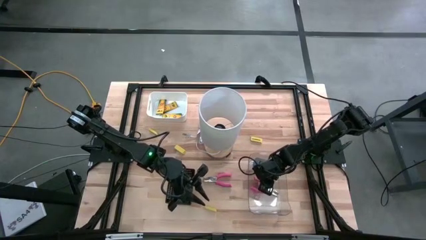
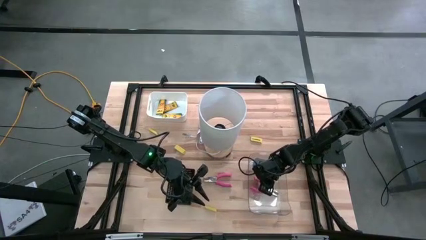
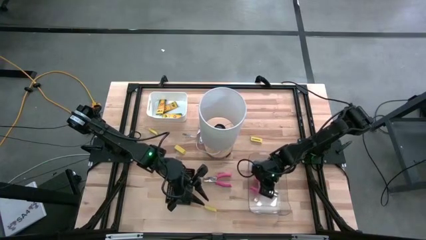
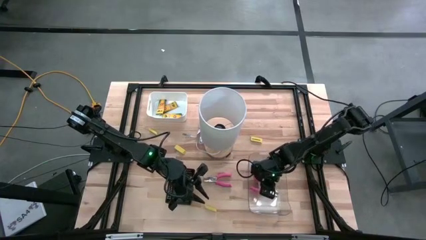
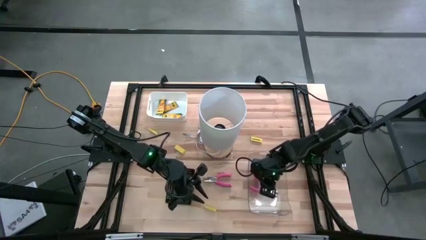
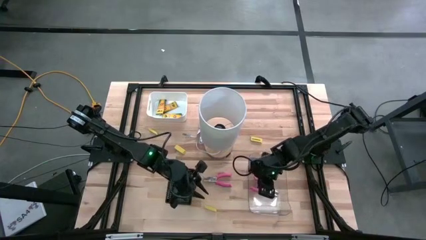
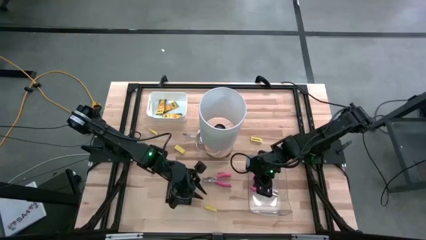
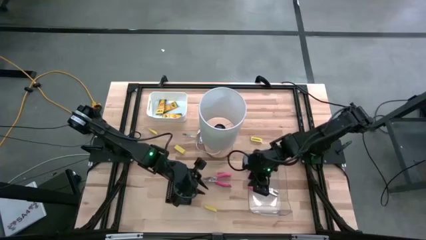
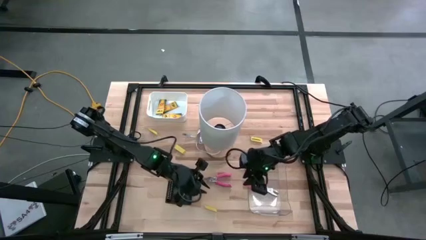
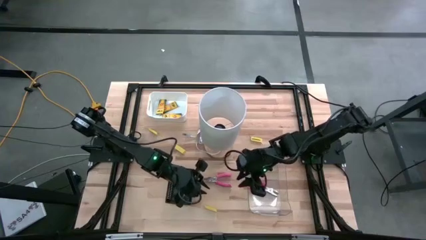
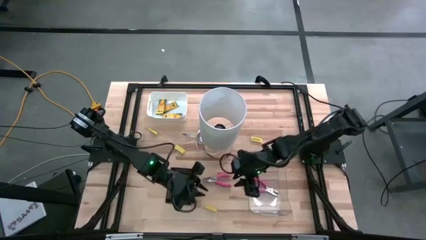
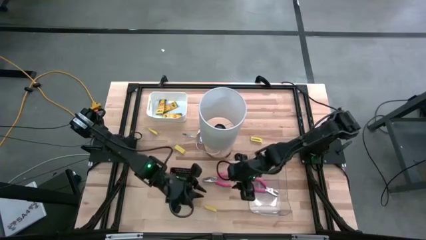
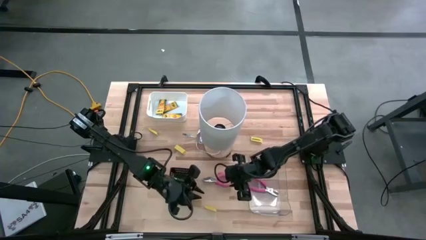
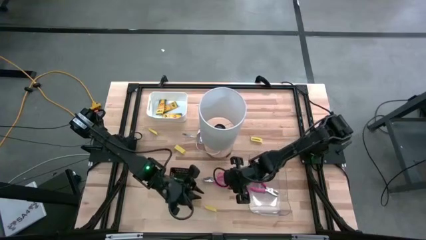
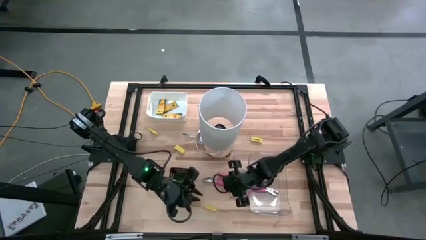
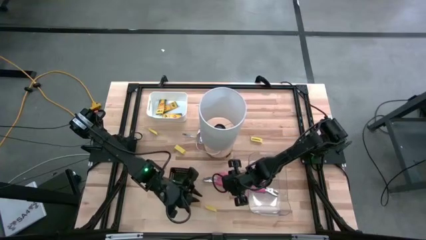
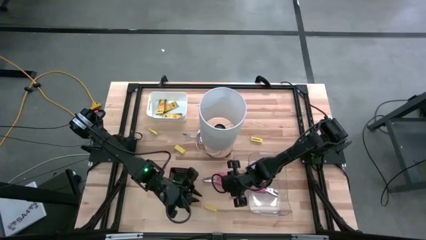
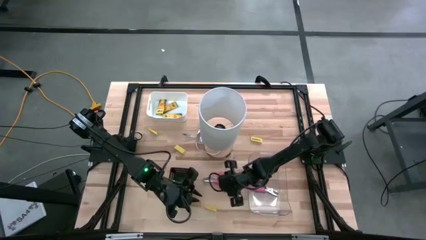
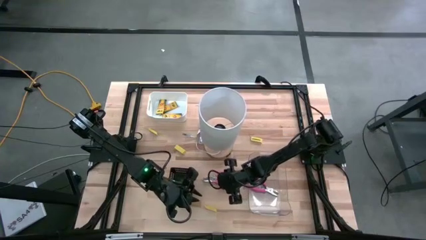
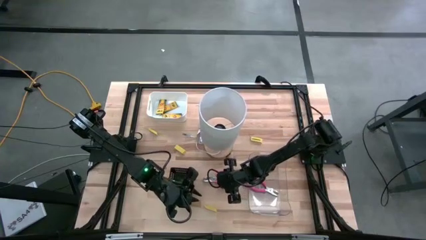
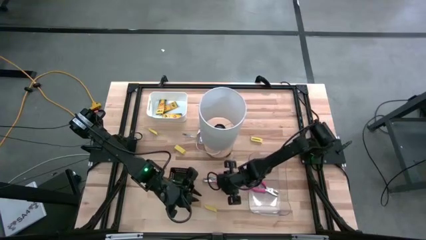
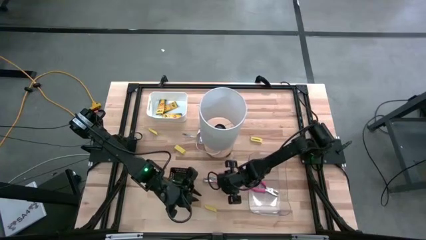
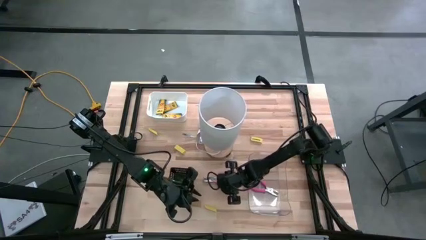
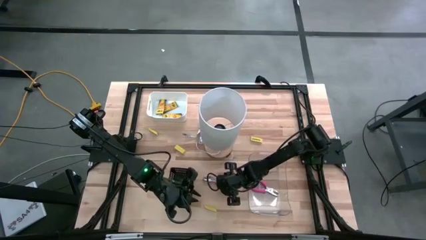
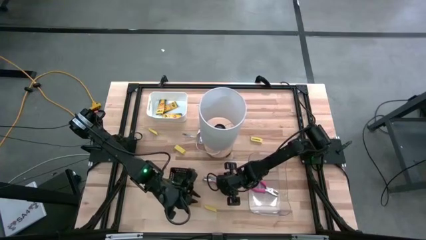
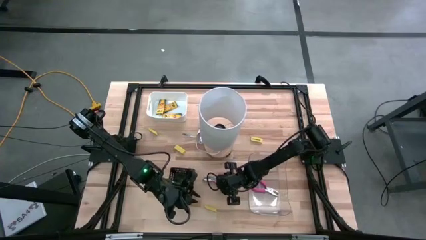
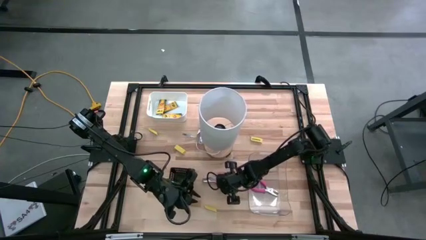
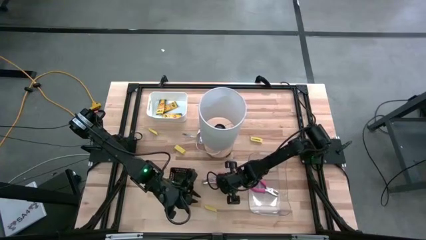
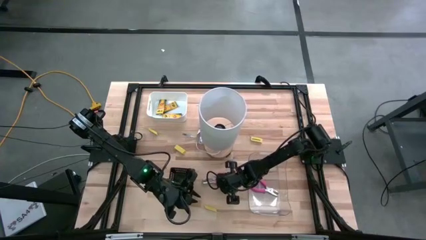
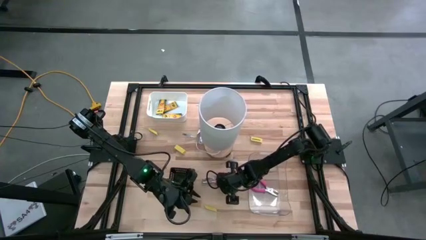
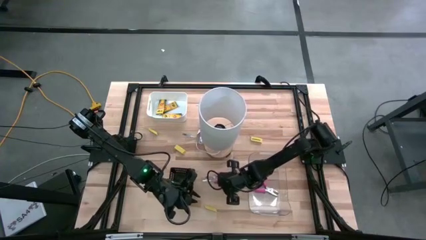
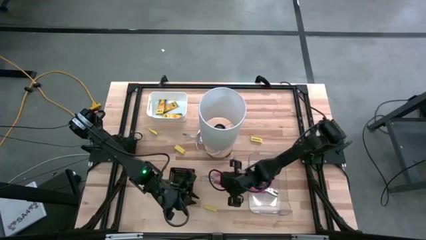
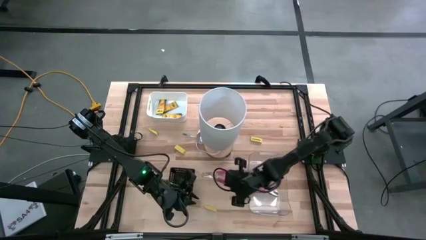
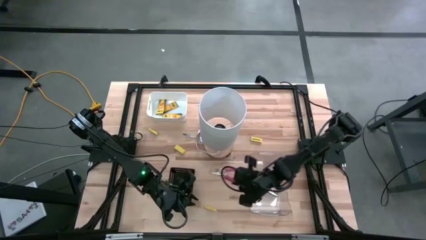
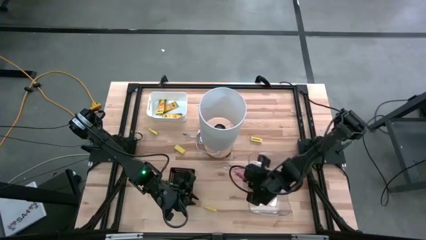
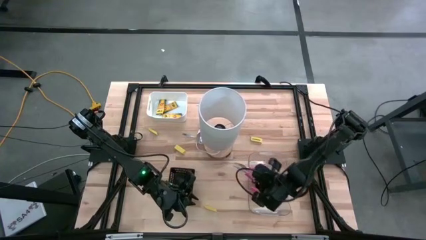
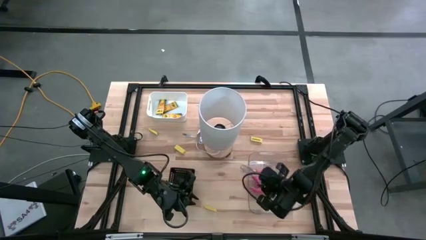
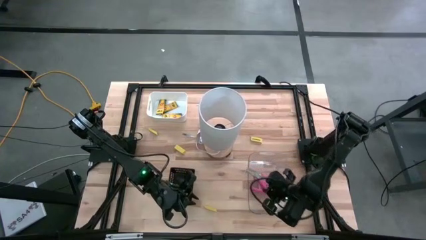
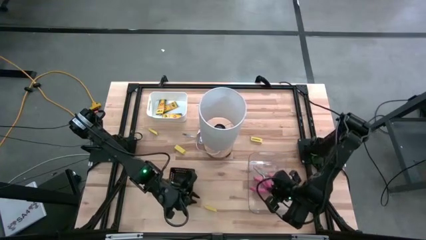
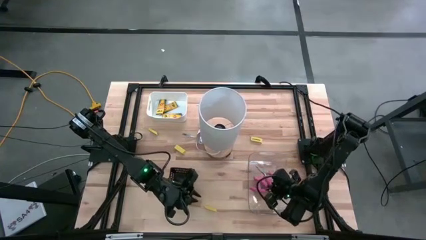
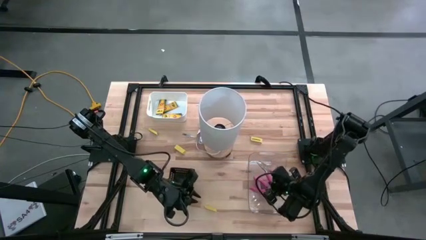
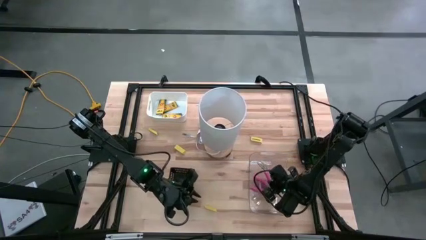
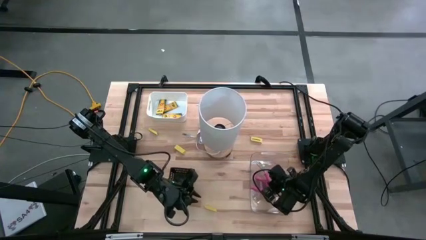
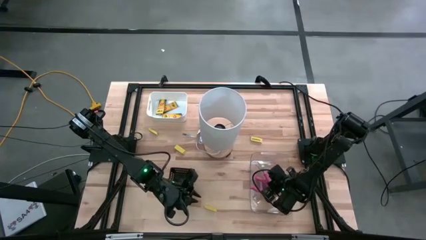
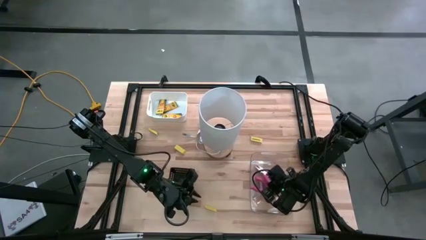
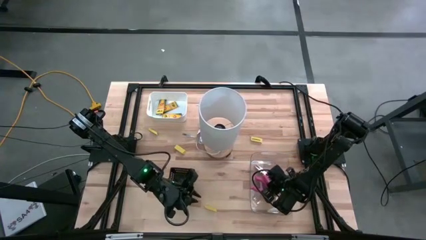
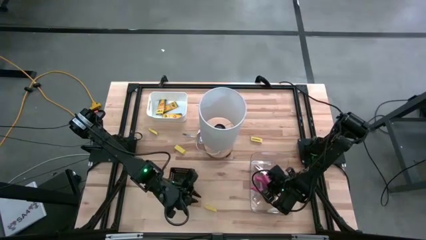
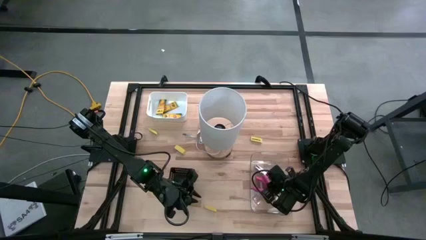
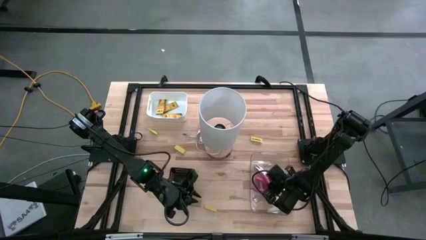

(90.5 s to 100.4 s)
Task: Pick & Place School Supplies
Put the pink hole puncher into the transparent bin

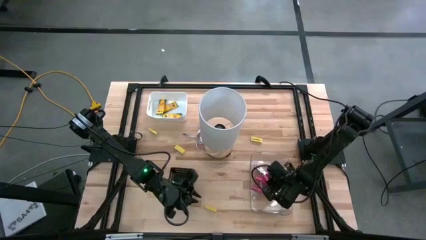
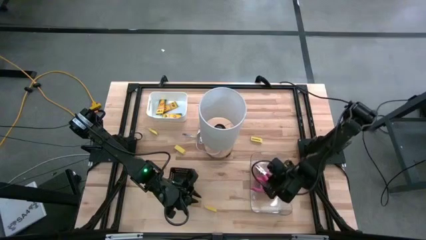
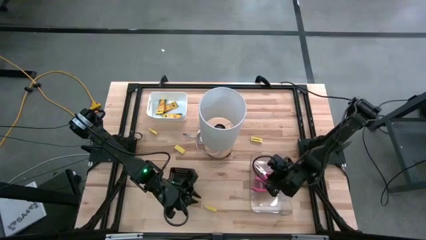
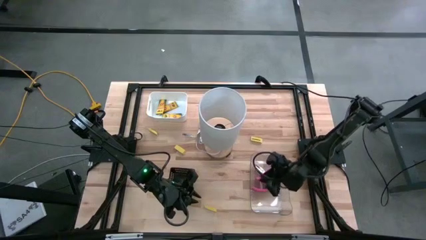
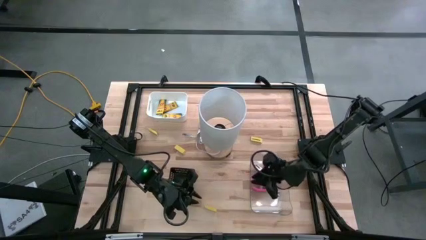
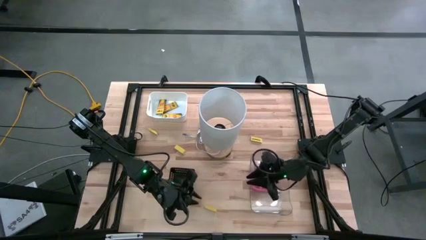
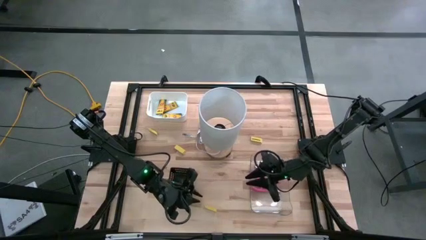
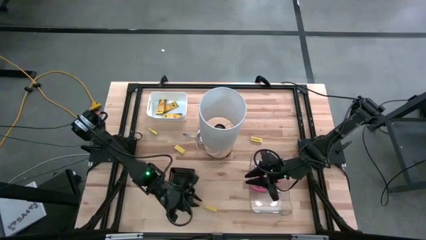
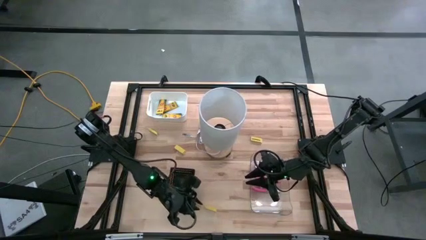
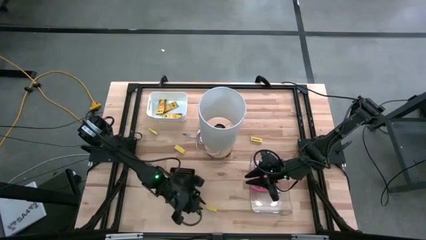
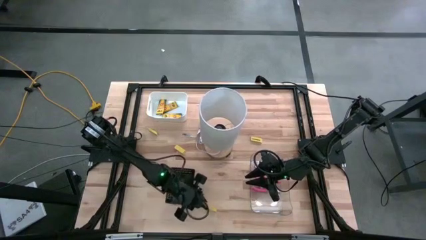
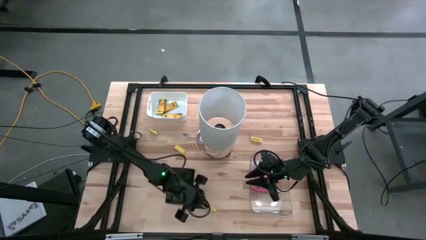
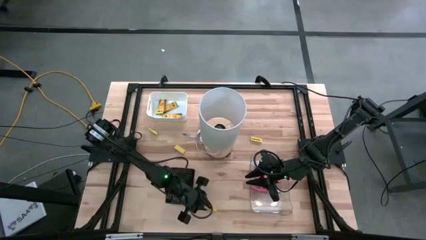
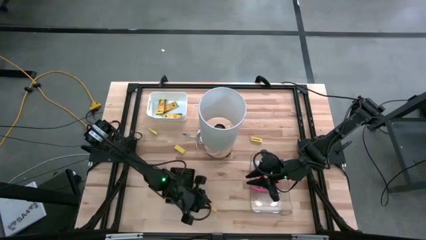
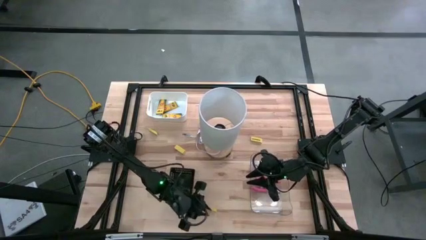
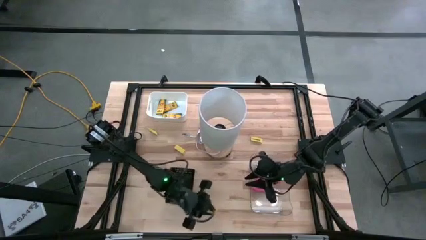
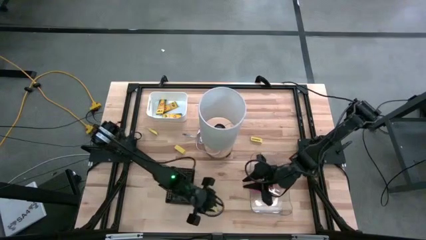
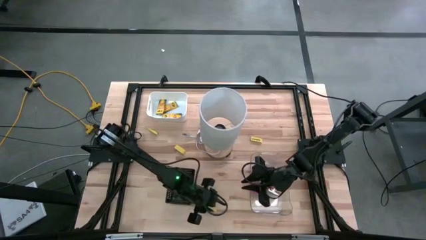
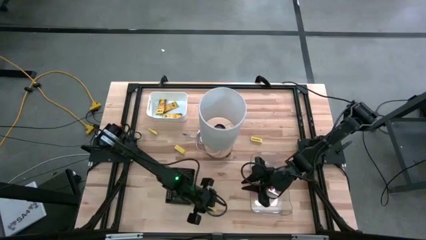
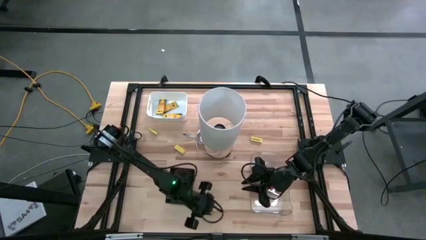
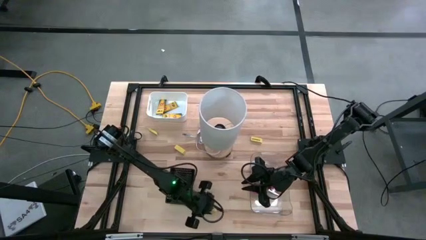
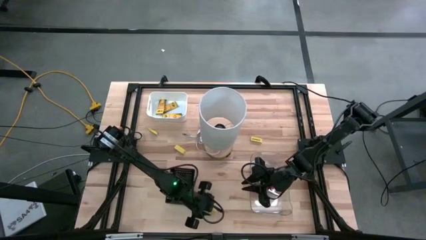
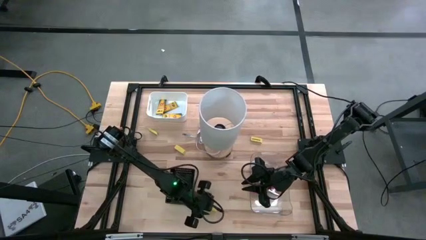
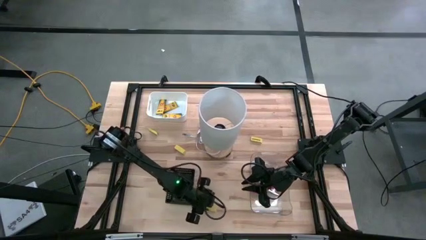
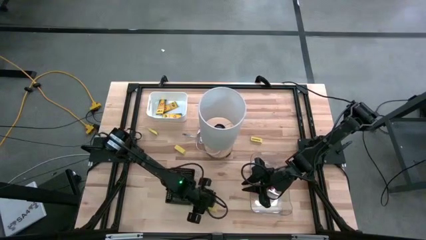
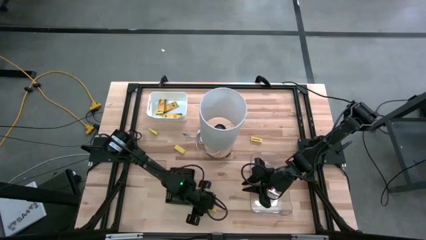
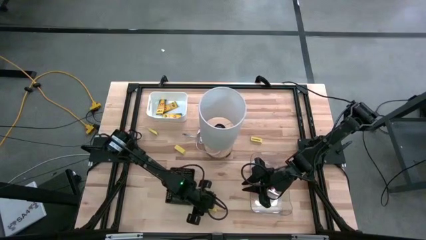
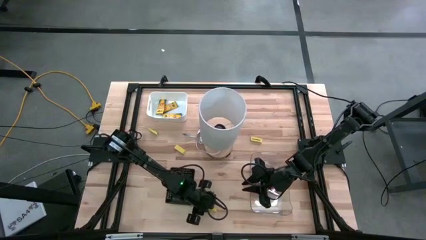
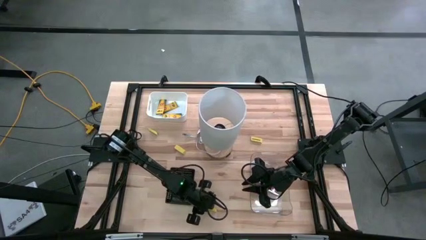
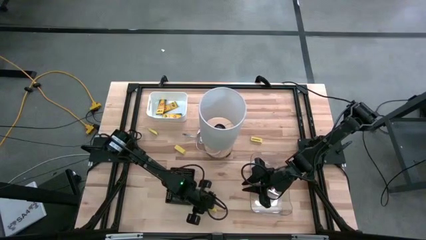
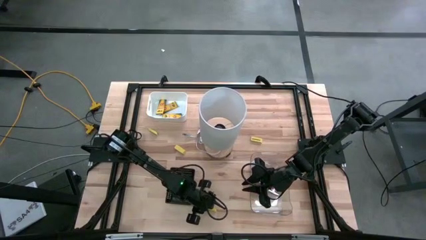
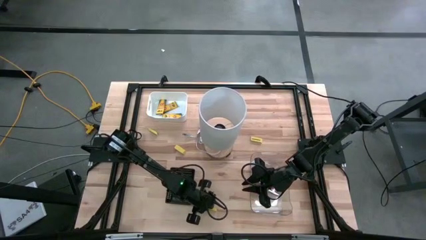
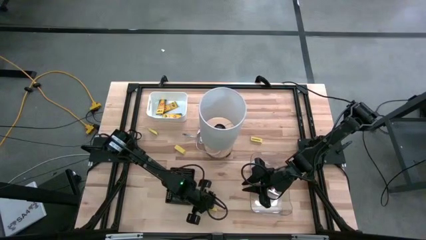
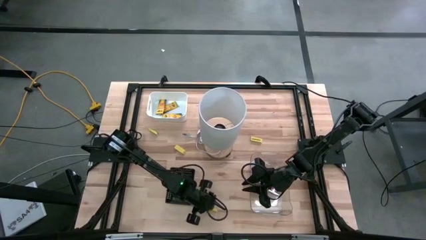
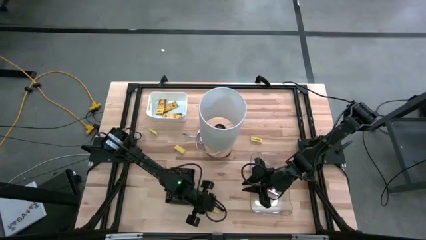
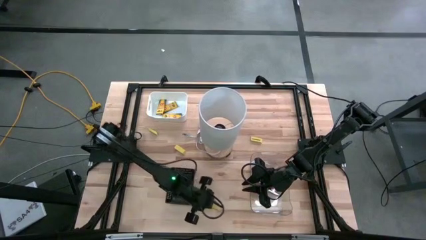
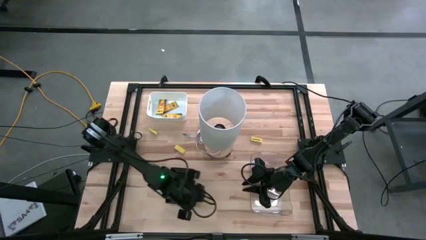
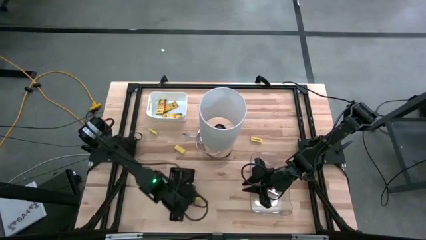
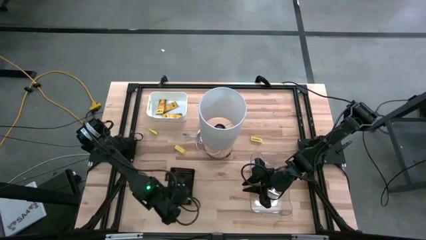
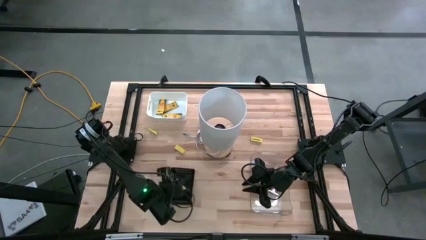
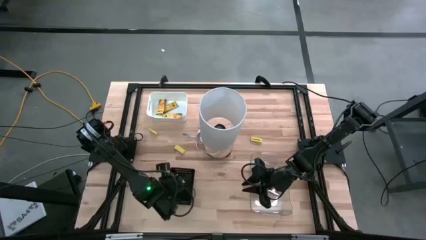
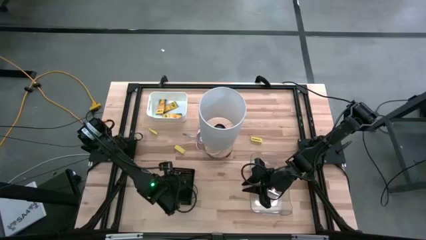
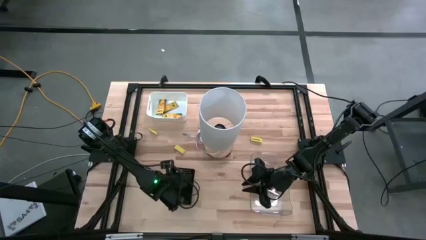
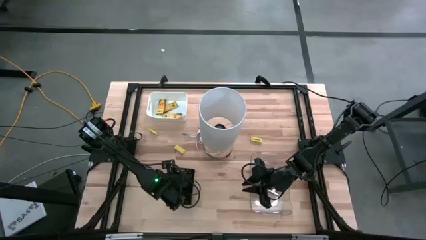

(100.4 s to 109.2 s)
Put the yellow eraser into the black bin
